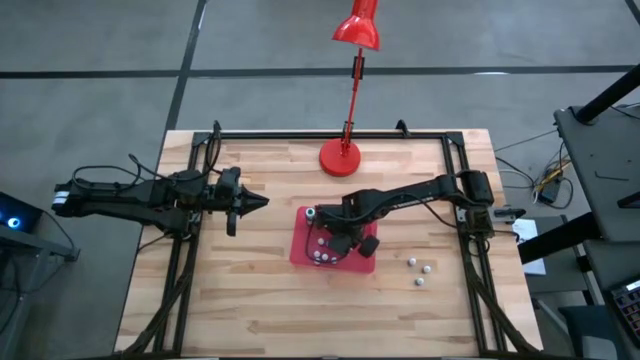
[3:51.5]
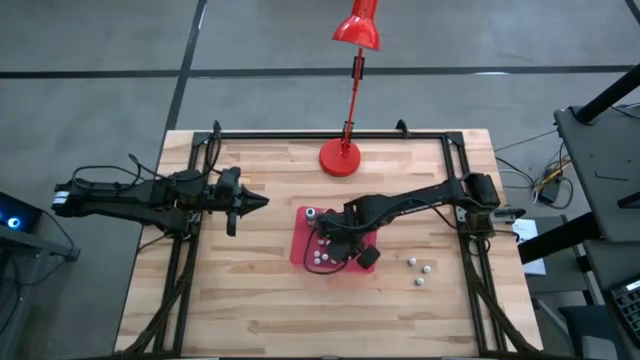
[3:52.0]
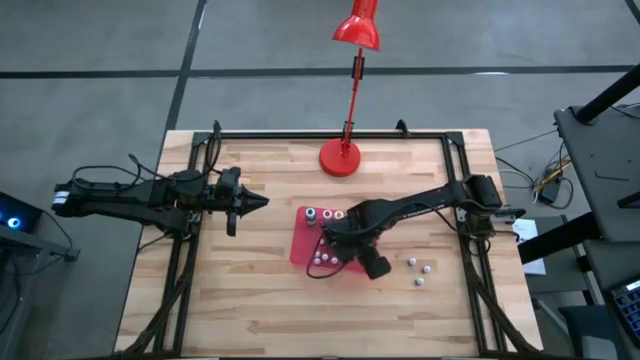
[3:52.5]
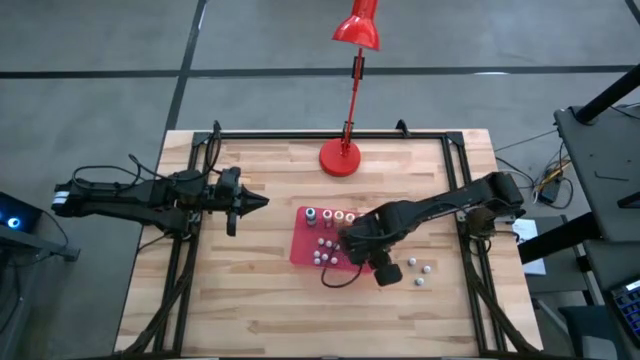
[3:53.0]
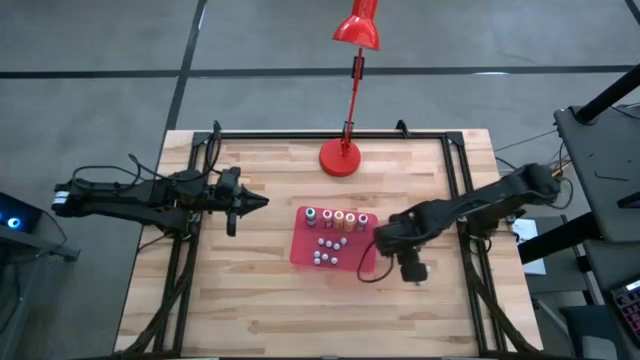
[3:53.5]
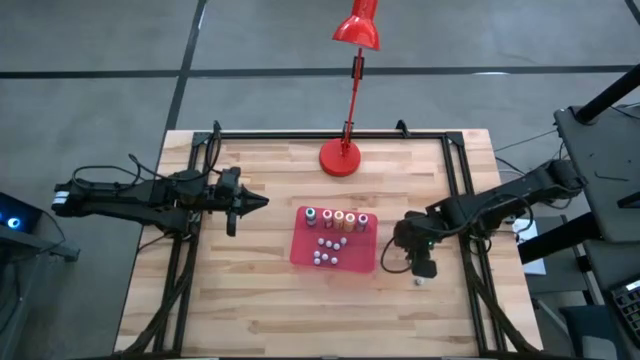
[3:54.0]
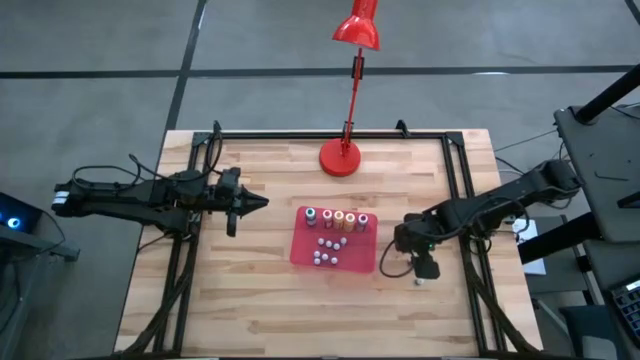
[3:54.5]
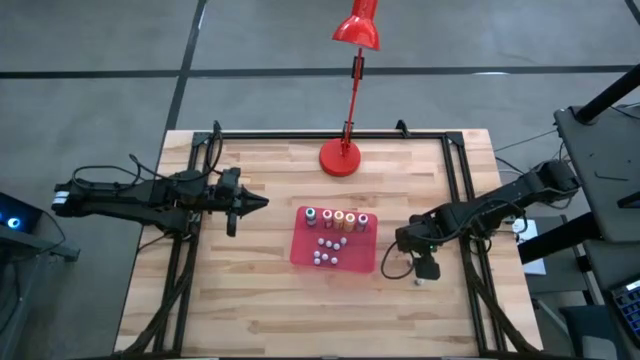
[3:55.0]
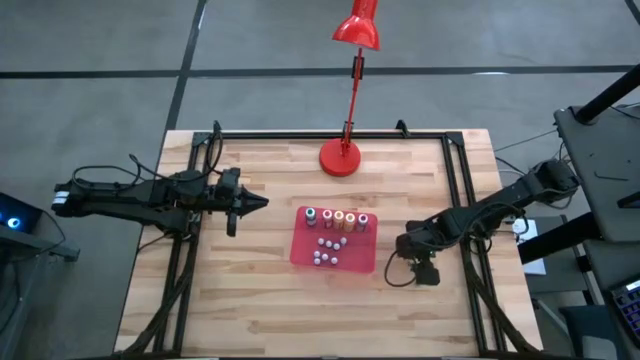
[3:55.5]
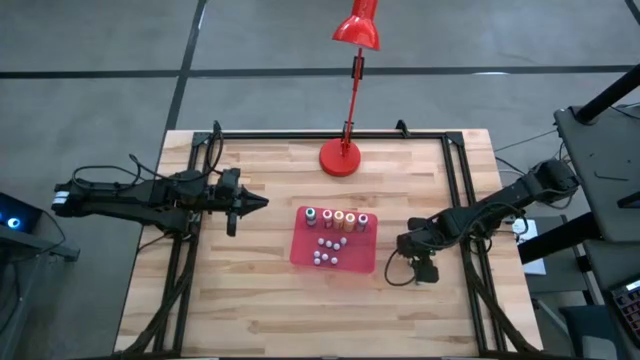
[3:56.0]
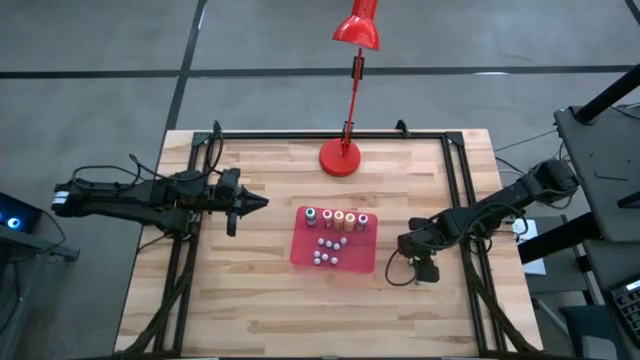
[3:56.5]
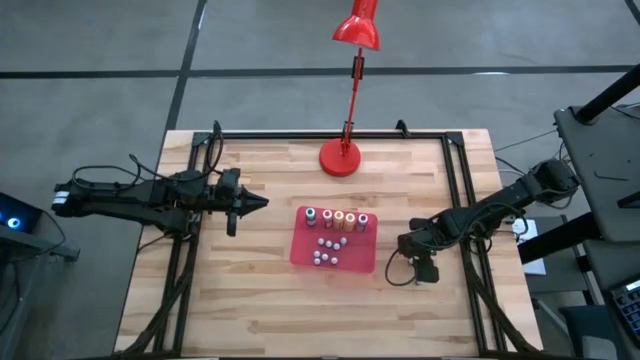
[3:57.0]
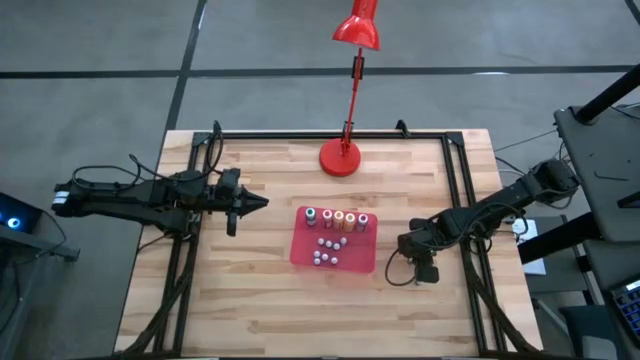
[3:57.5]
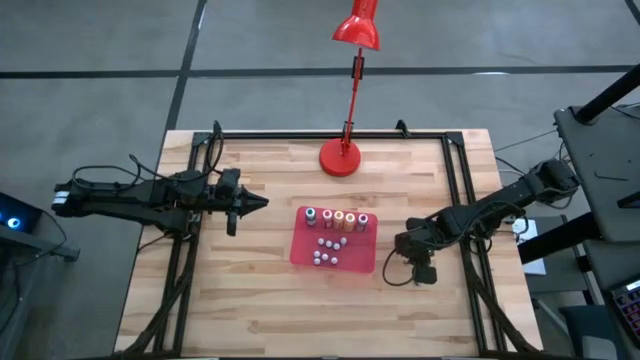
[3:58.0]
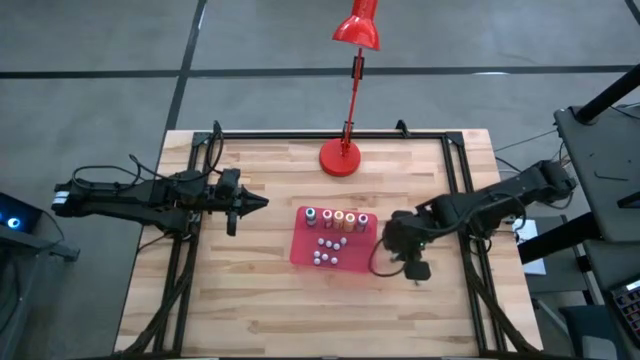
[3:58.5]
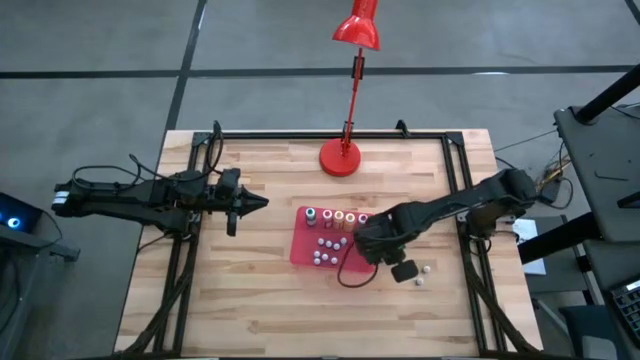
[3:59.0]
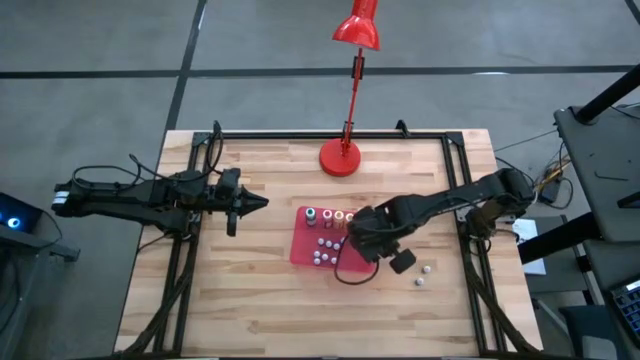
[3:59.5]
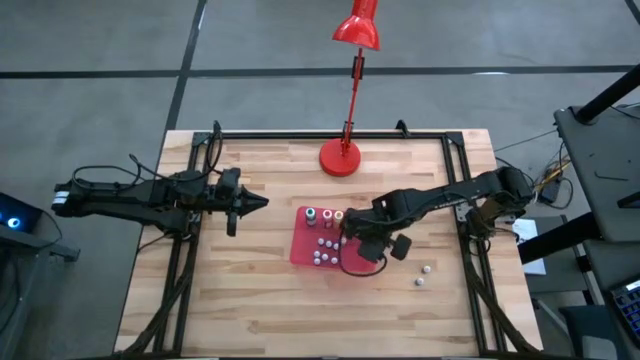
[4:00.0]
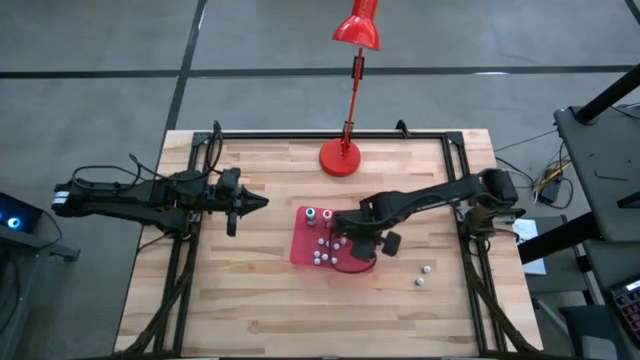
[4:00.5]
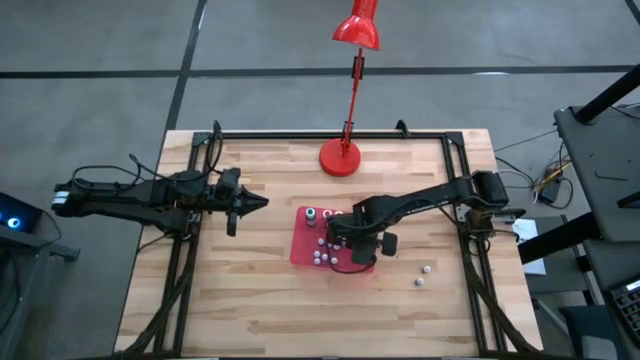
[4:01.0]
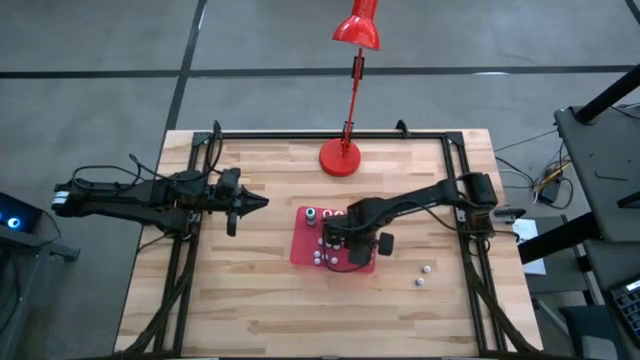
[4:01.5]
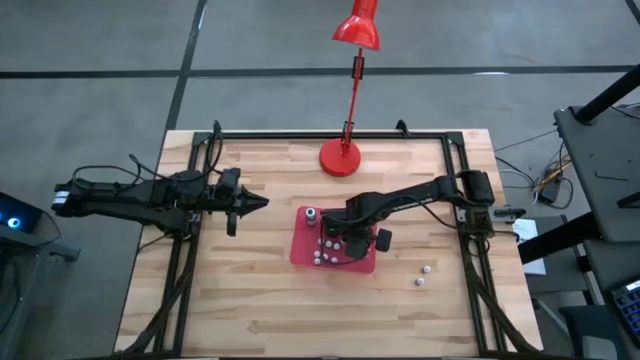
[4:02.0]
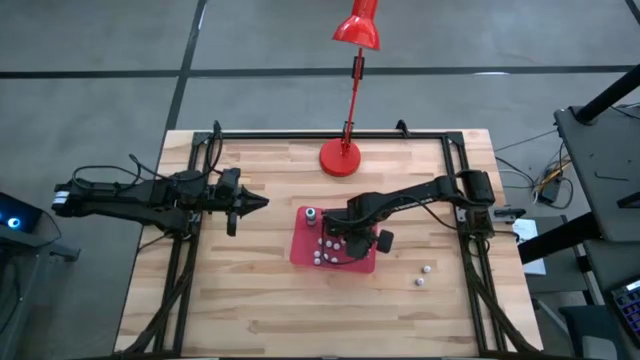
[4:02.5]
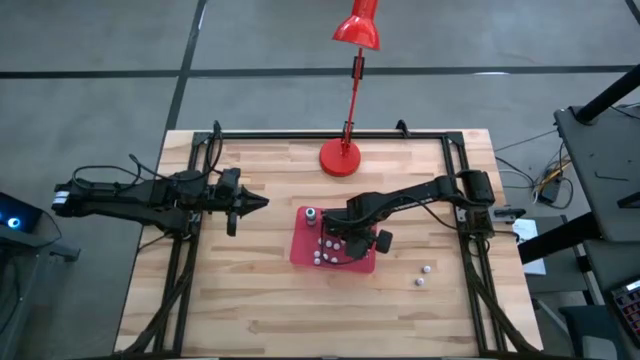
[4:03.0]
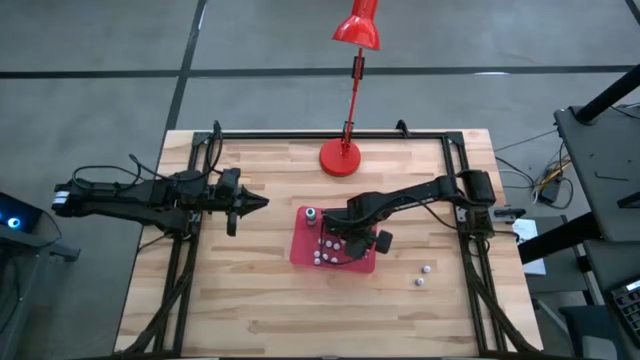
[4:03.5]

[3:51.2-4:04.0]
Task: Pick & Place food coloring
Put the small green food coloring bottle into the red bin

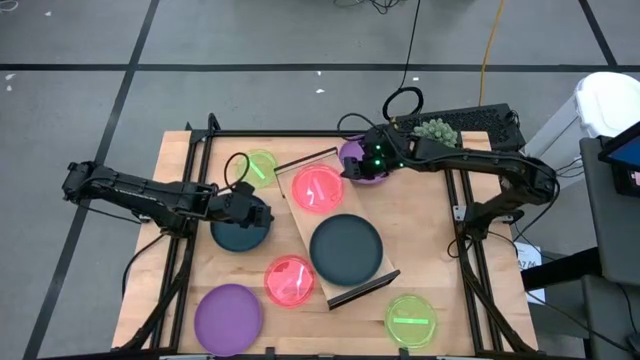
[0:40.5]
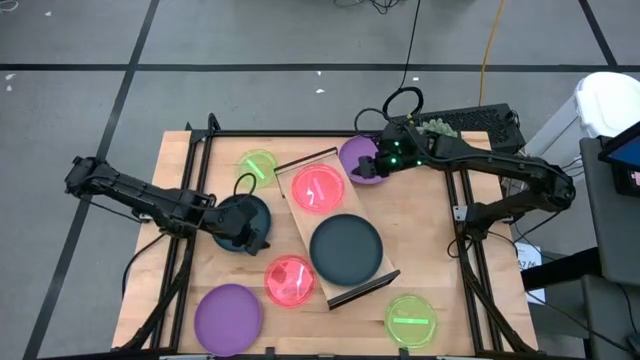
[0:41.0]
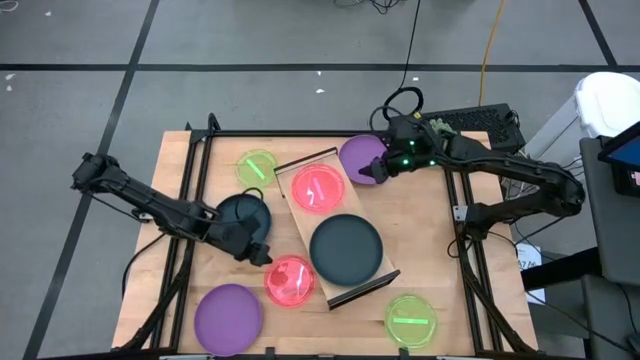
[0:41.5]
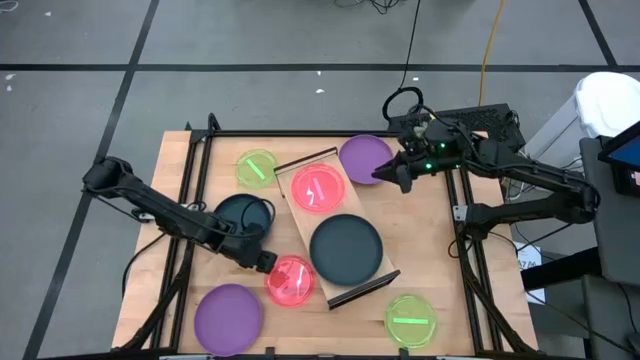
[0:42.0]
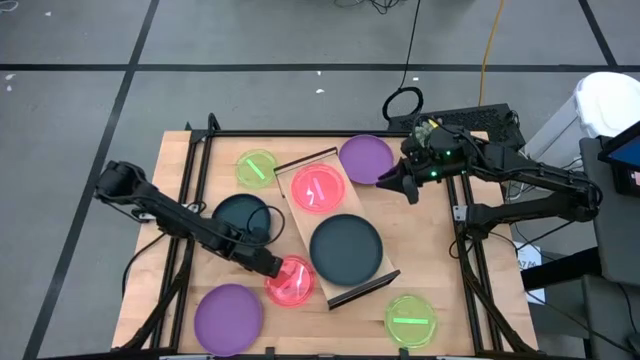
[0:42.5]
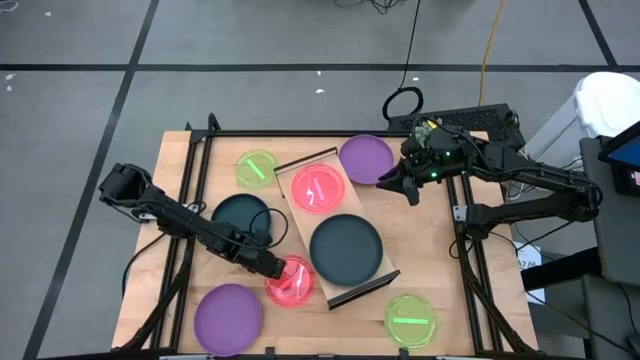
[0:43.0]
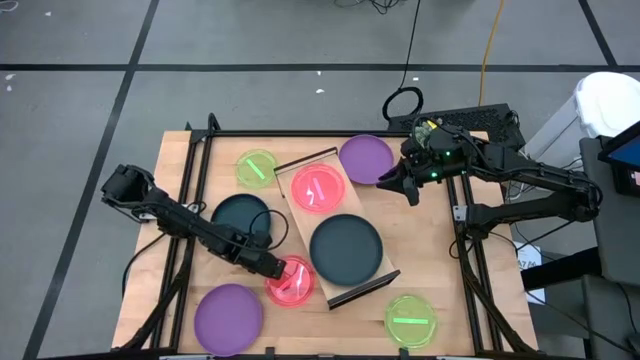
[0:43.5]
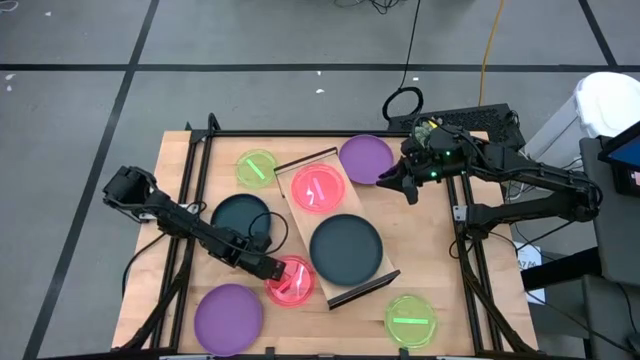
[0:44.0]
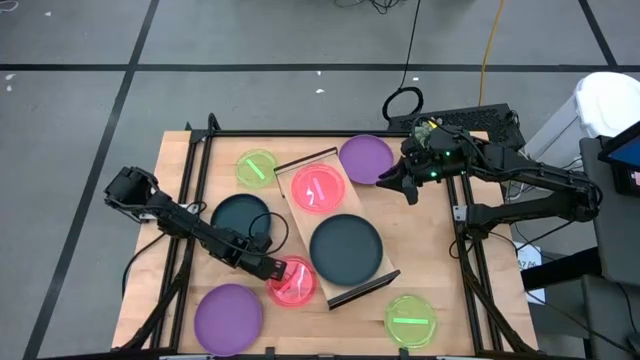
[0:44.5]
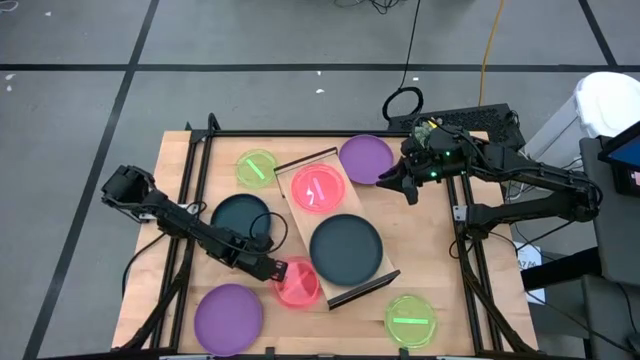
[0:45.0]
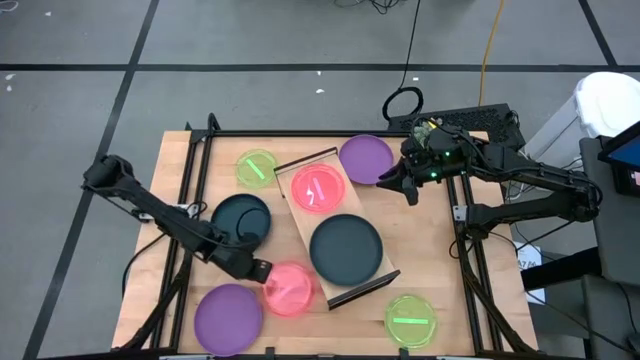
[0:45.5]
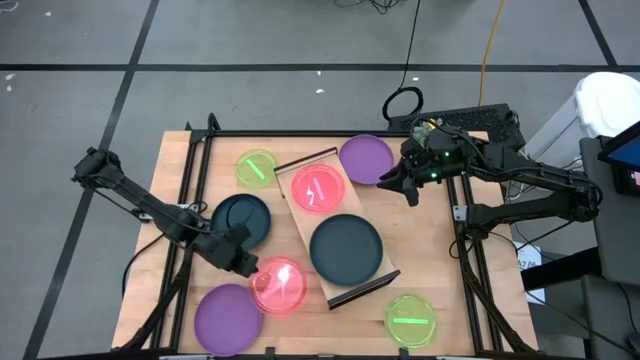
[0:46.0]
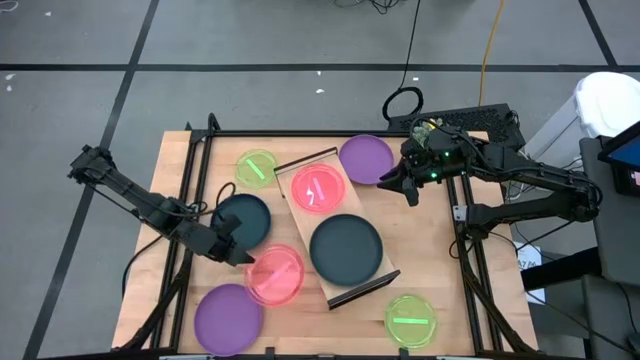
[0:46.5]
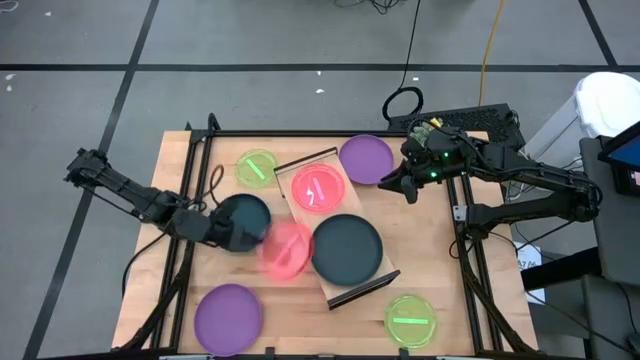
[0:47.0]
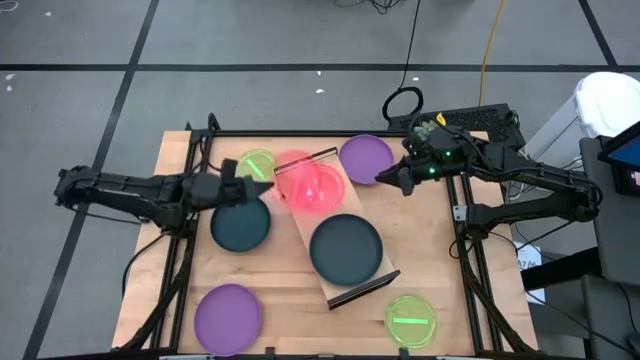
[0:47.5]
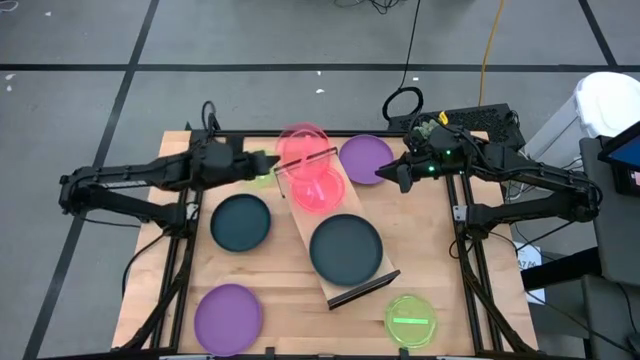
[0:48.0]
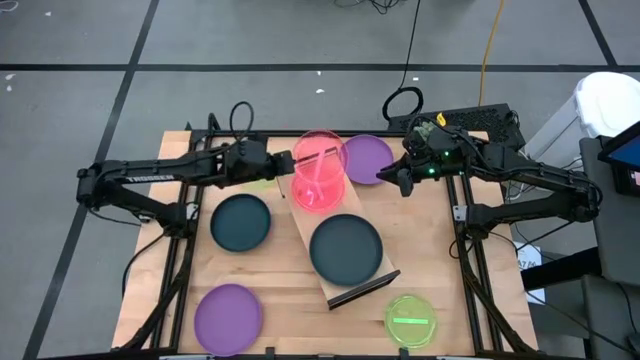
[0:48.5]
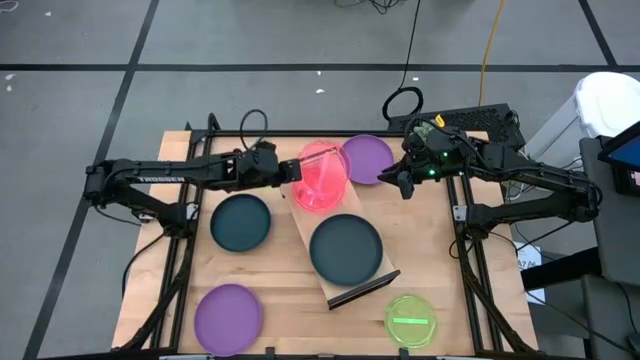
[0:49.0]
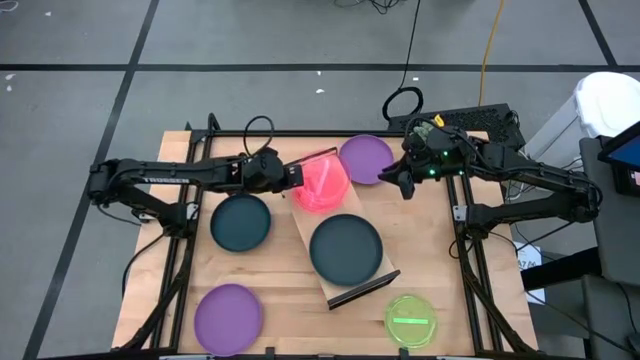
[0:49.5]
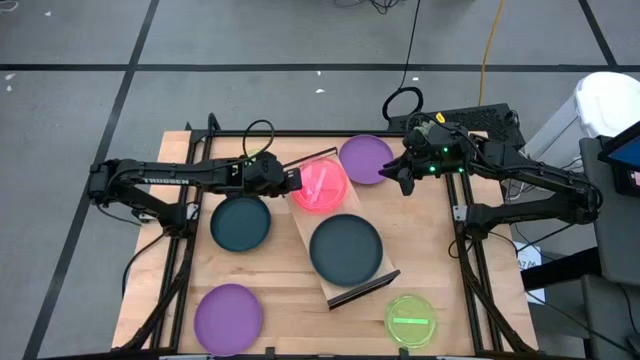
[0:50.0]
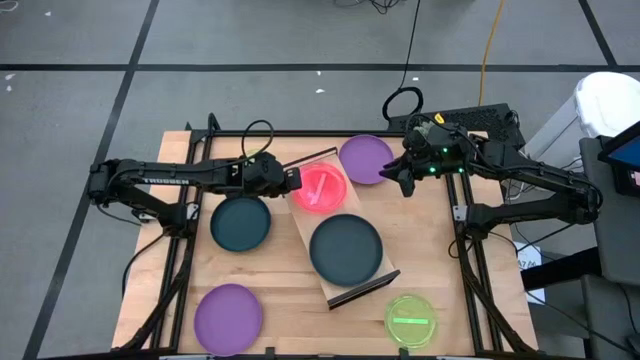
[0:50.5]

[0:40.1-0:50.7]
Task: Place and stack plates onto a shelf
Stack the pink plate on top of the pink plate on the shelf
